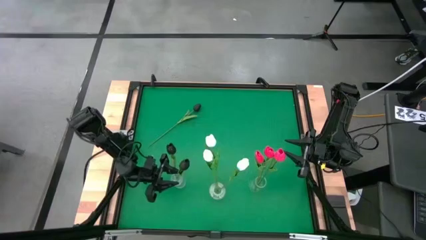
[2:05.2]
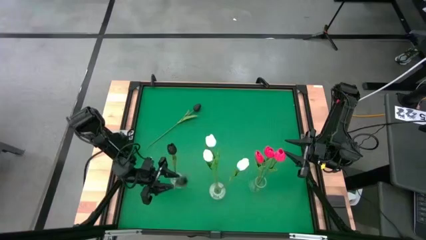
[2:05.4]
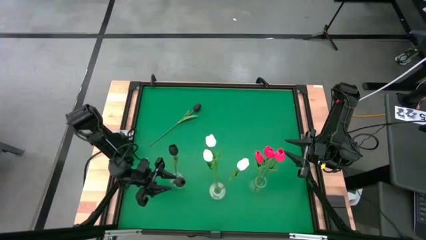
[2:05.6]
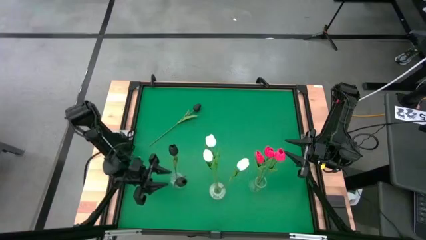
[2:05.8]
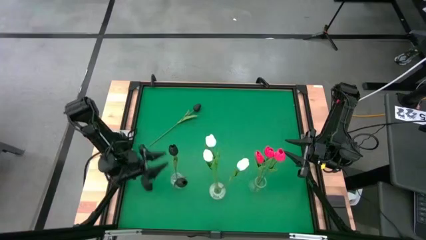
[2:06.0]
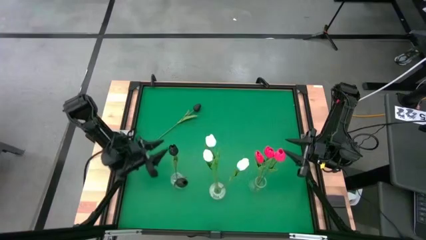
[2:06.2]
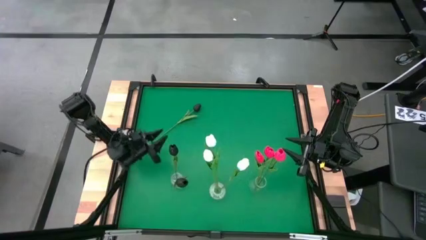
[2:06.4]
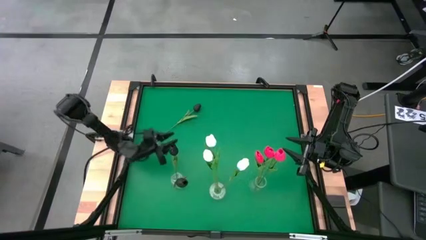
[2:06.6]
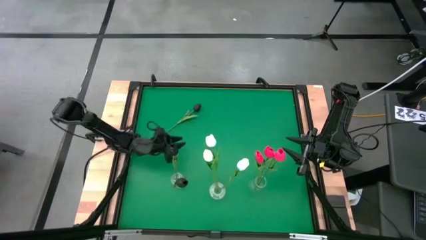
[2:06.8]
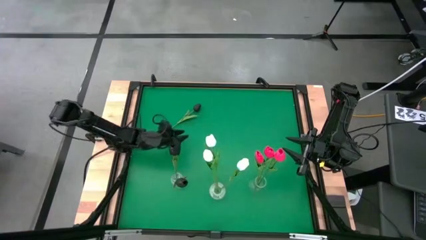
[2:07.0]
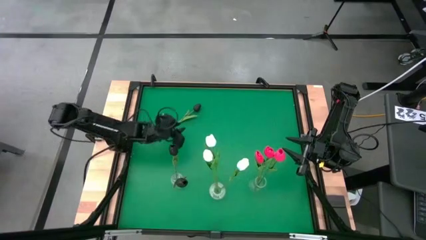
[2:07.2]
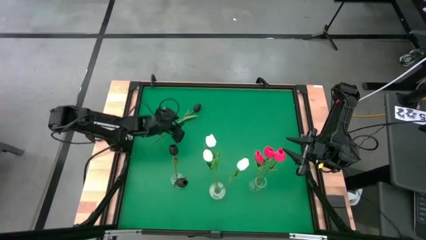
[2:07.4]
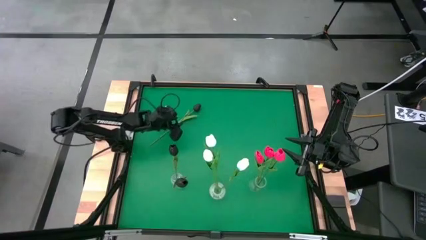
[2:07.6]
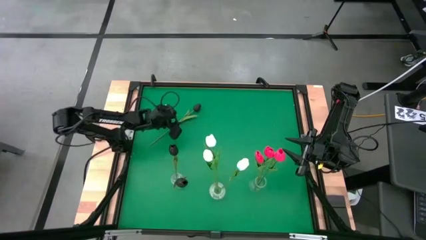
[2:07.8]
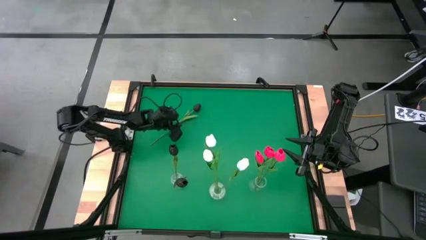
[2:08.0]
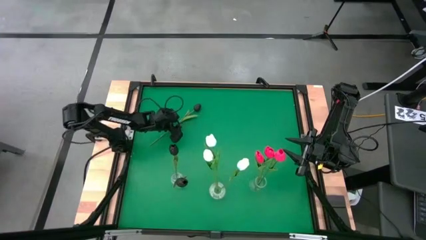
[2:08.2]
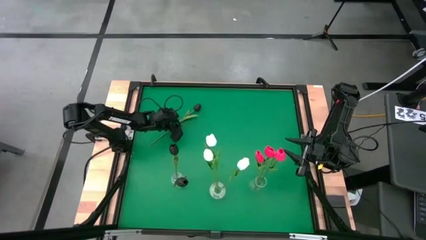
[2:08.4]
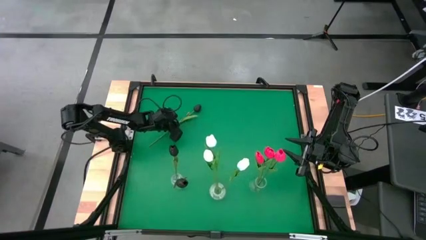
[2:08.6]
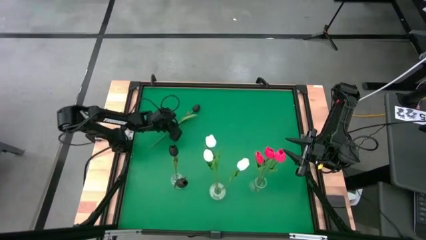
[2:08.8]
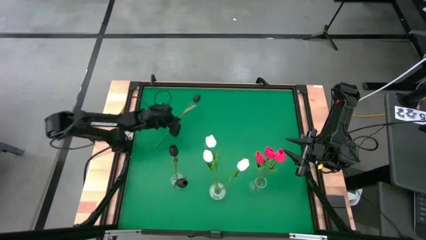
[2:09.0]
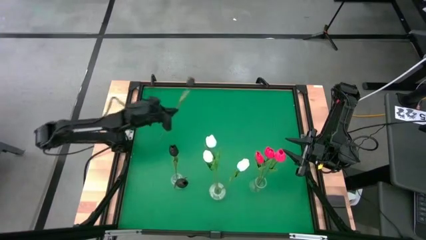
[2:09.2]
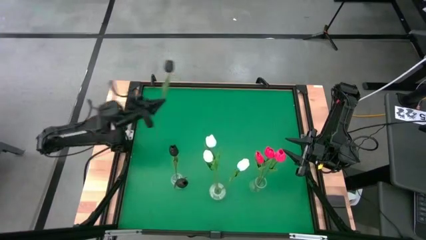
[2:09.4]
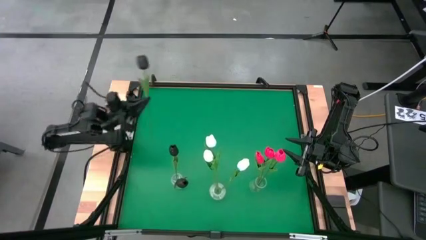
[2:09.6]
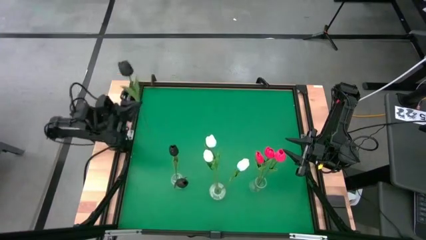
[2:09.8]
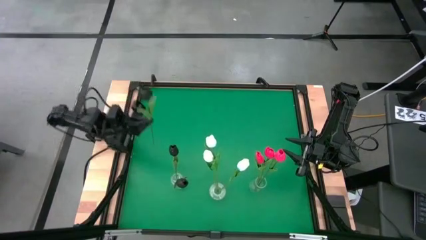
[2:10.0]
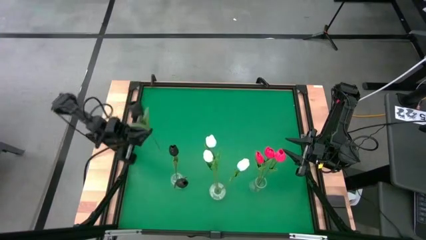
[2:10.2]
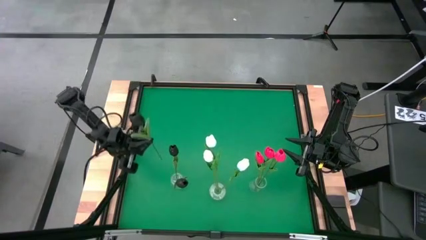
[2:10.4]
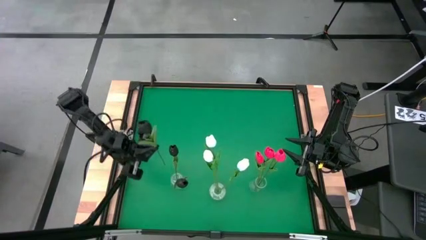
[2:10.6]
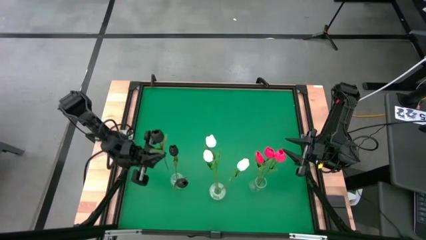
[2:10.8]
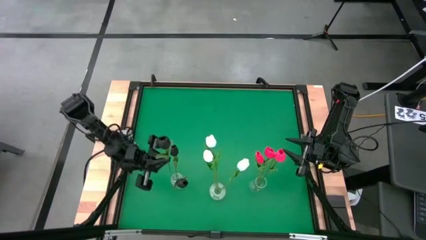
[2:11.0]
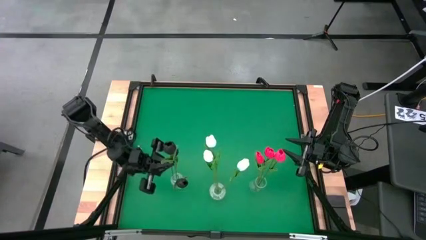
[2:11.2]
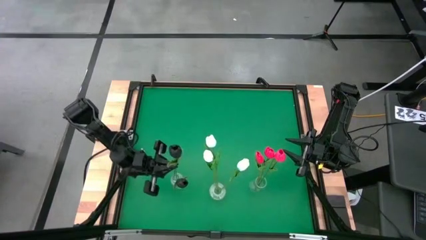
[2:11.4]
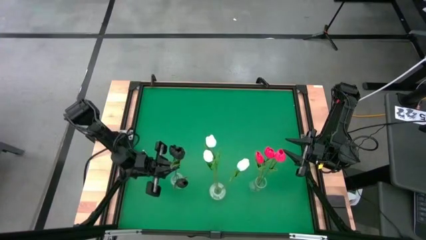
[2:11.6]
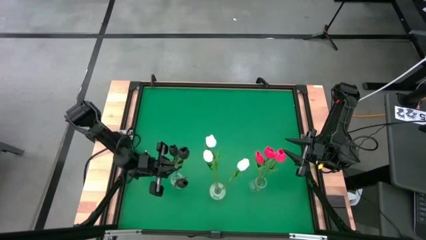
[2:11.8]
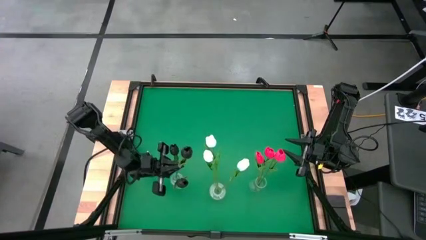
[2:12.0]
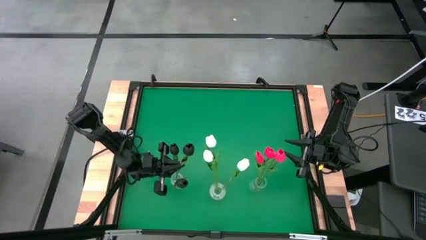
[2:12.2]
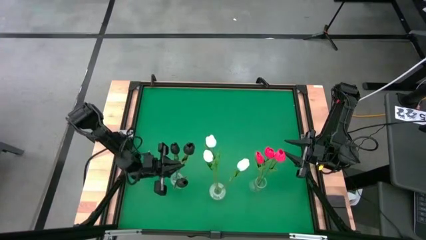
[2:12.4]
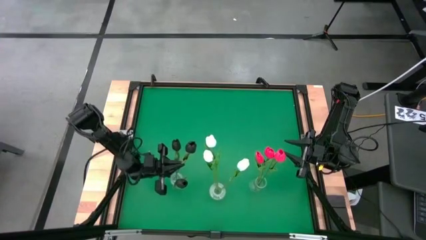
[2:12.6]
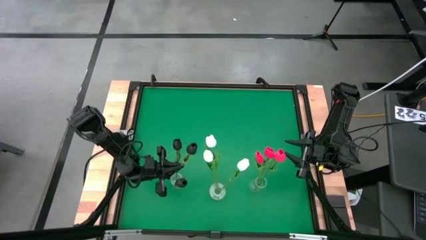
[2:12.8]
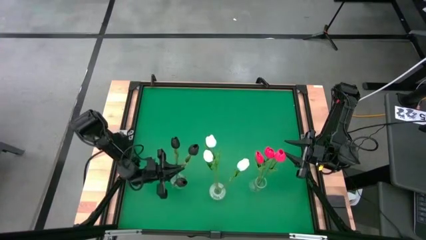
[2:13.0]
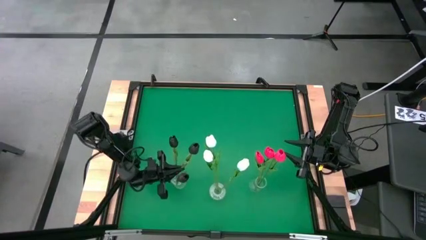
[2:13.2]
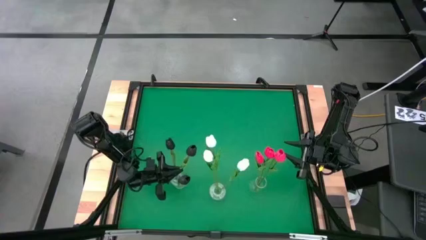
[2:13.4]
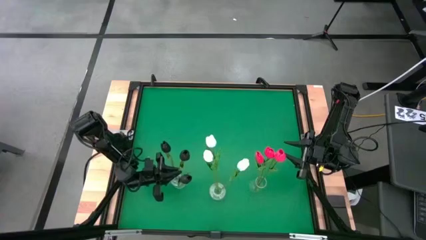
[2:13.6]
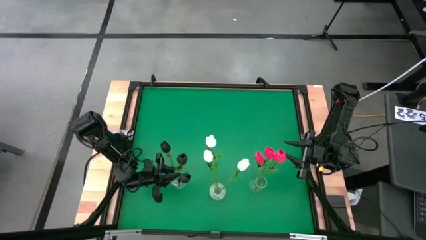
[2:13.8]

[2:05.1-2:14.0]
Task: Sort flowers into vase by color
Put the black tulip into the left transparent vase

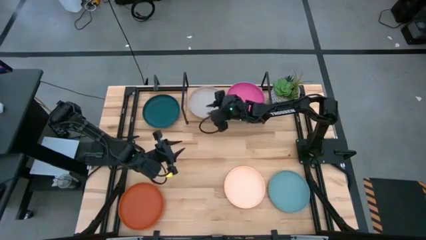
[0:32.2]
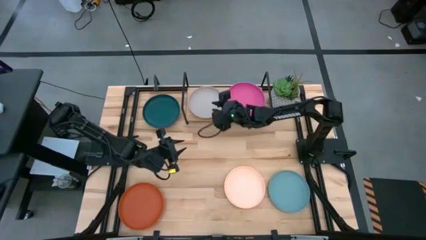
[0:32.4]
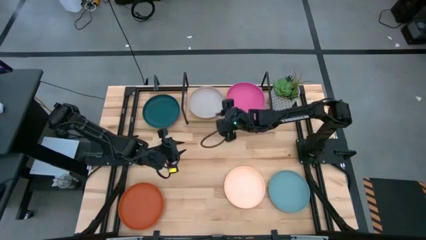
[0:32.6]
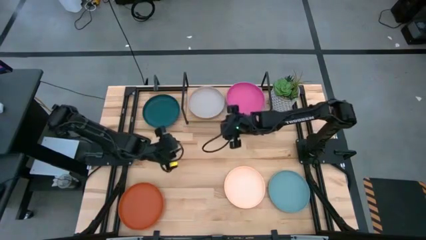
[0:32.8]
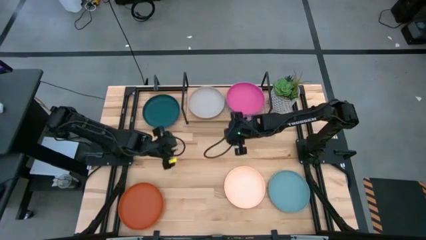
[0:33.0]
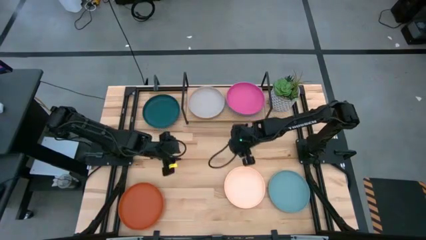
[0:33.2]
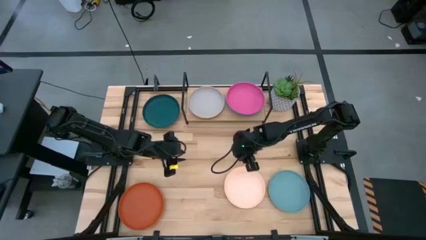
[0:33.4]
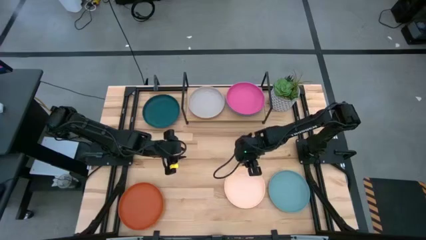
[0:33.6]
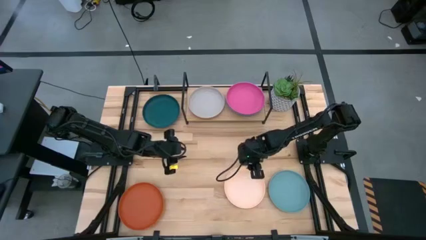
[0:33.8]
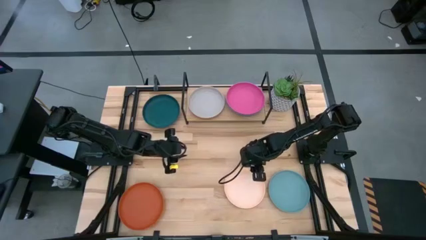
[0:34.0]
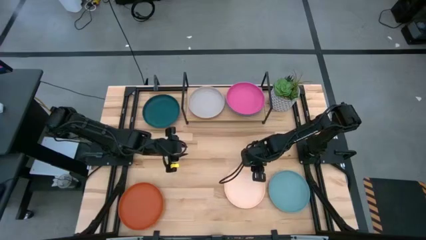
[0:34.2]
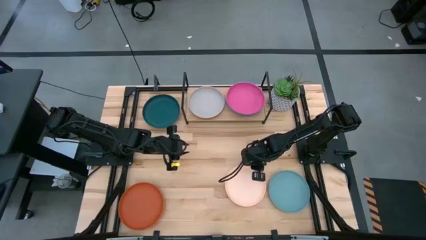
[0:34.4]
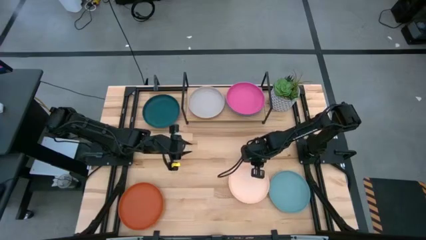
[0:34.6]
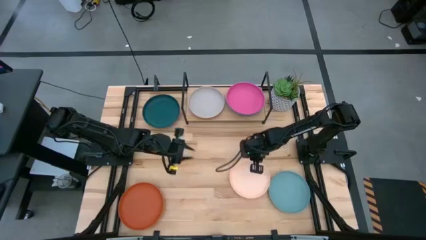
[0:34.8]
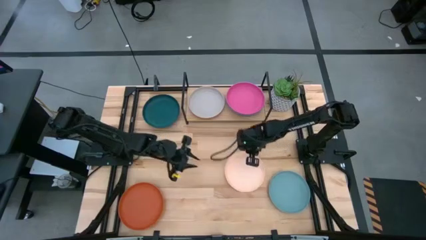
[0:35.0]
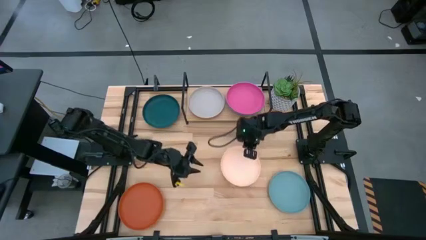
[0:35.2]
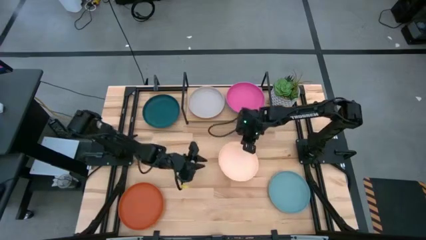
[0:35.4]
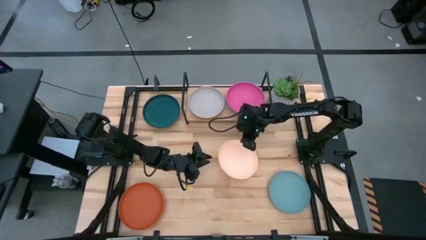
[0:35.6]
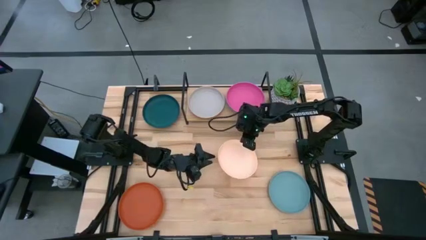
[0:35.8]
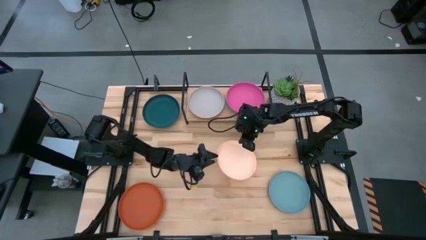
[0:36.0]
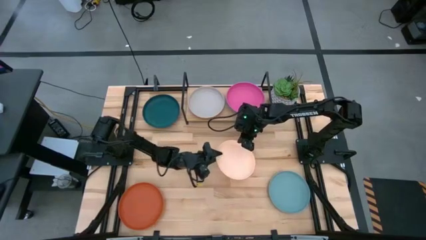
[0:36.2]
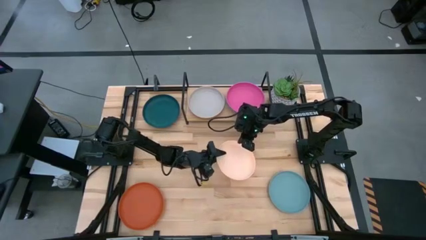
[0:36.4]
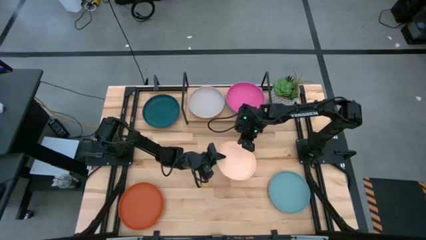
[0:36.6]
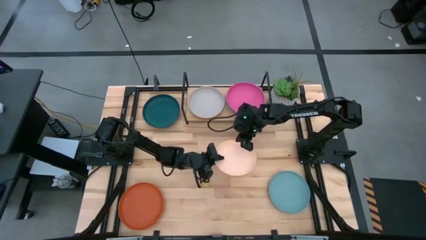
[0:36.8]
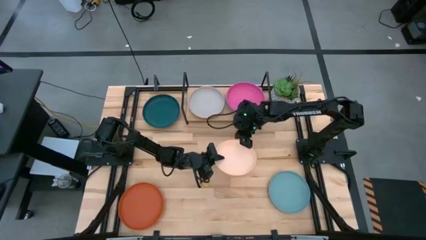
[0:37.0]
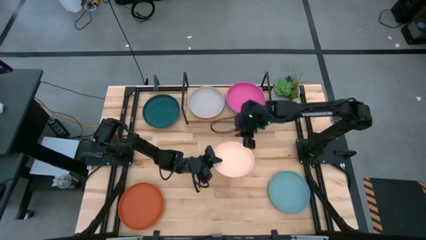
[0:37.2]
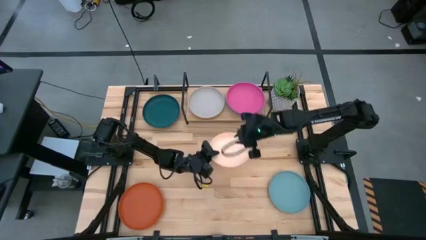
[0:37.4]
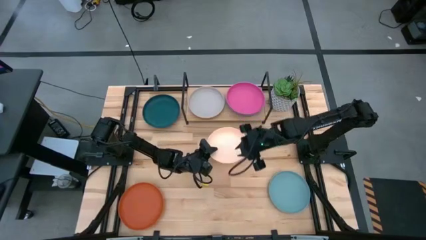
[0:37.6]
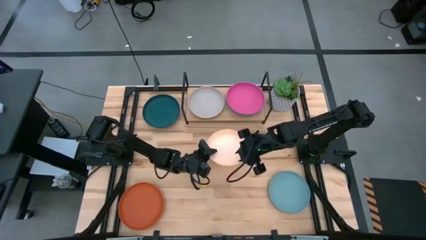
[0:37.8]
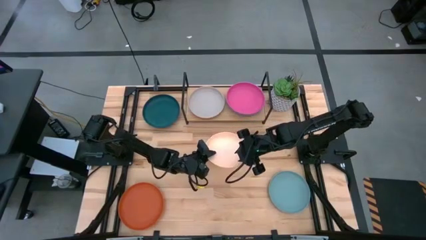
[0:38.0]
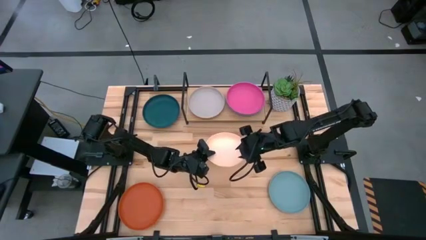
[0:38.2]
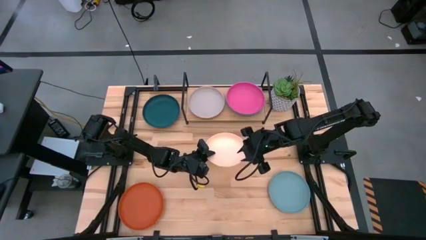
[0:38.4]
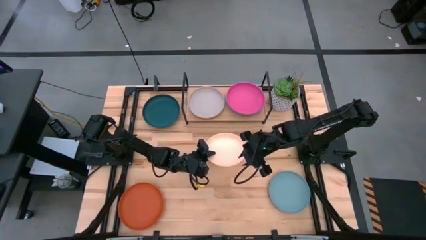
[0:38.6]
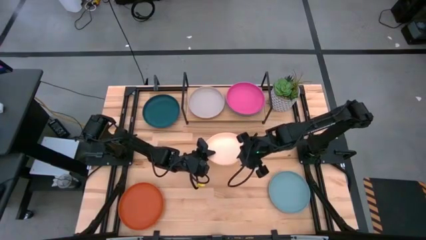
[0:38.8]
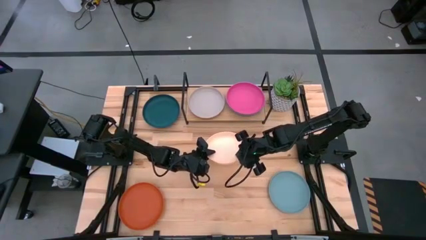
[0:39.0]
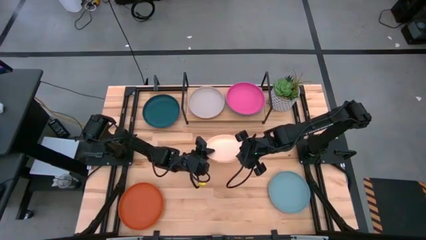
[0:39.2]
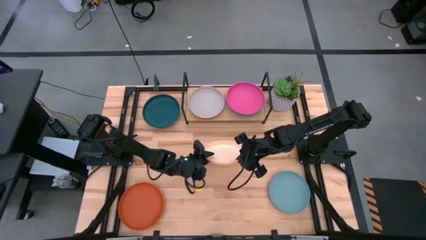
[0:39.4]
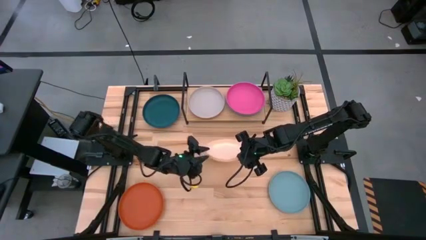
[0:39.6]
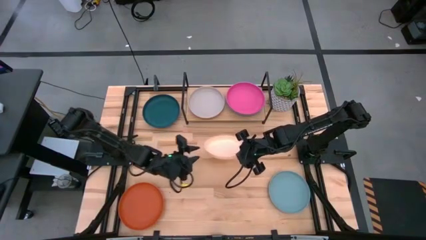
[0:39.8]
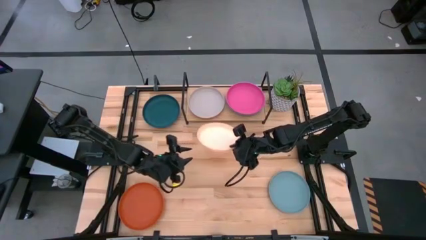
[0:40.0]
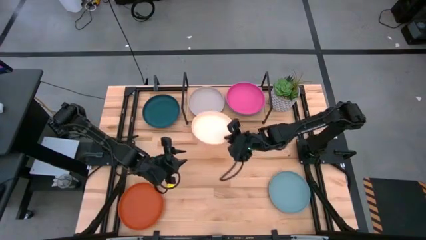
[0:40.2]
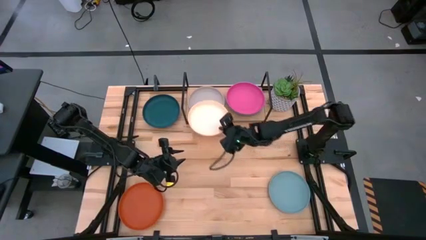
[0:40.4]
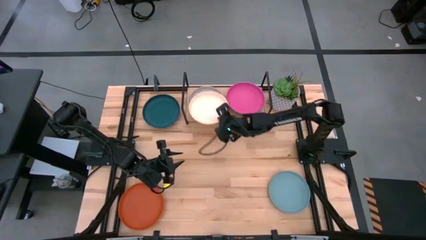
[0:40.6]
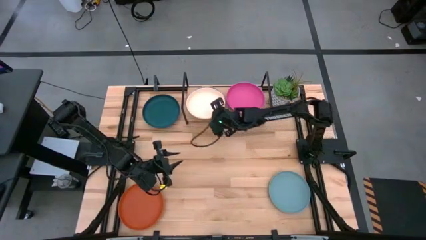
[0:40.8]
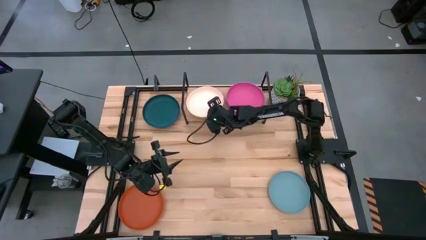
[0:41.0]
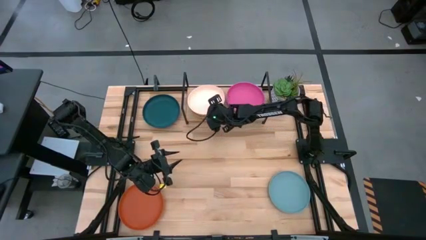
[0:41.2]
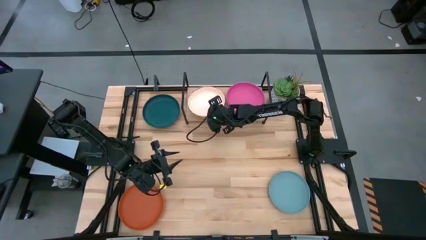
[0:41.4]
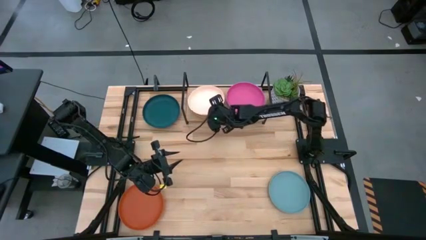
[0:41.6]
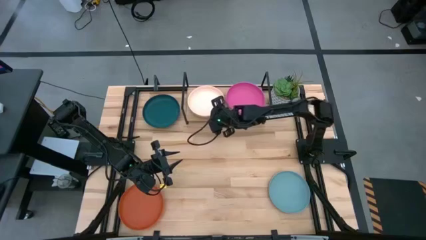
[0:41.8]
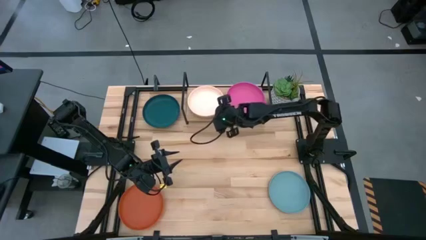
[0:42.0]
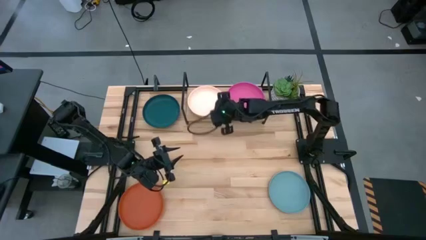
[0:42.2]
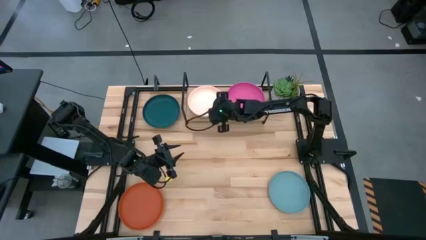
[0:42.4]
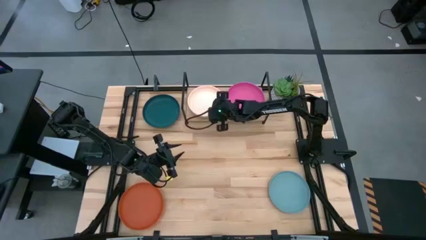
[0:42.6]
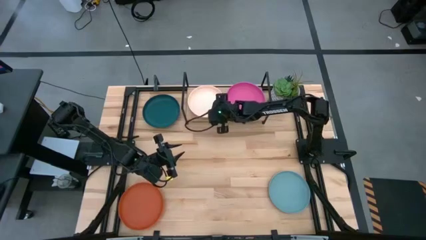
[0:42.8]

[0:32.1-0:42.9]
Task: Place and stack plates onto a shelf
Stack the light orange plate on top of the gray plate on the shelf
